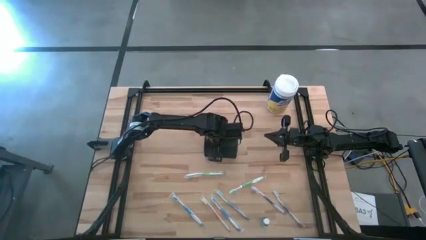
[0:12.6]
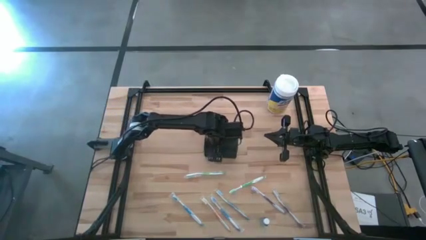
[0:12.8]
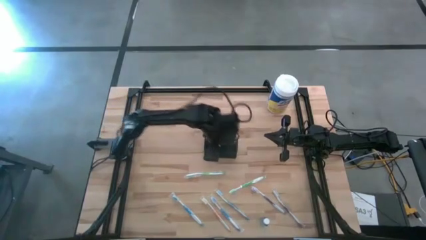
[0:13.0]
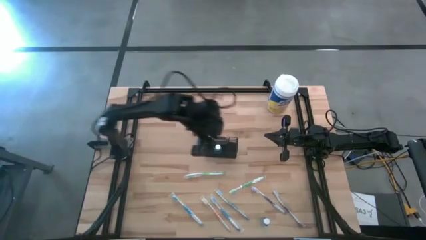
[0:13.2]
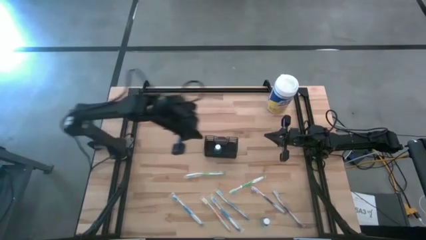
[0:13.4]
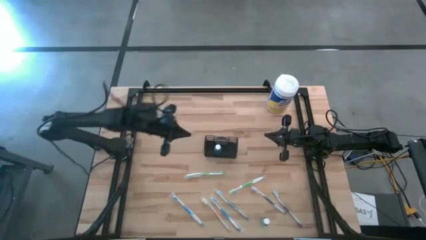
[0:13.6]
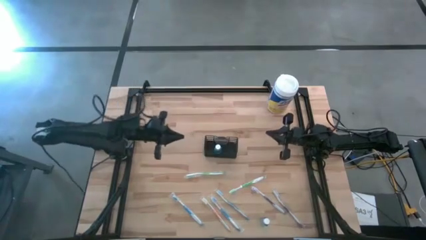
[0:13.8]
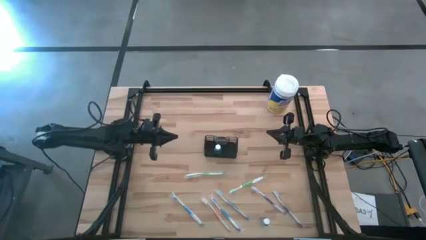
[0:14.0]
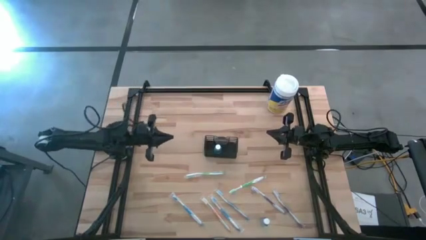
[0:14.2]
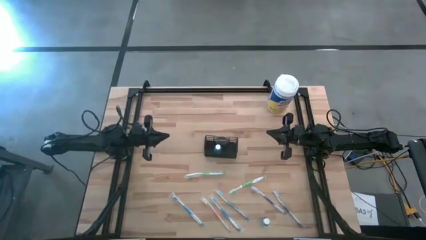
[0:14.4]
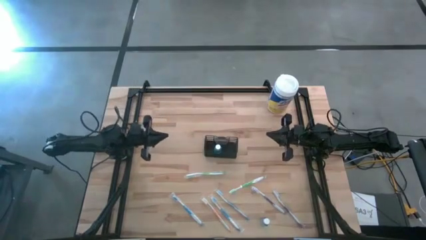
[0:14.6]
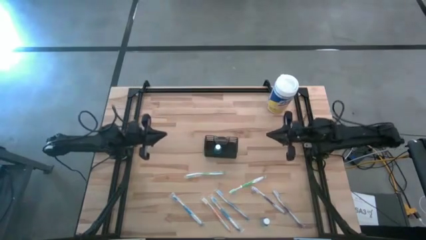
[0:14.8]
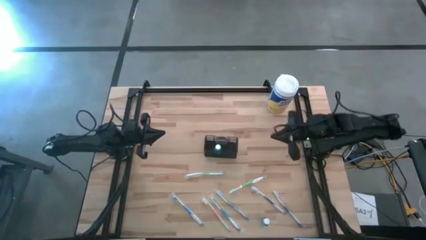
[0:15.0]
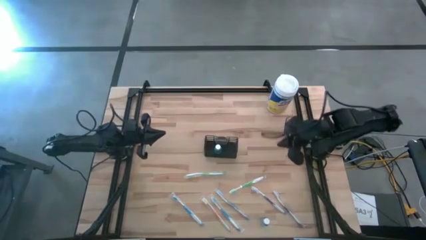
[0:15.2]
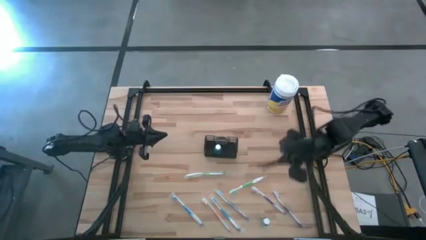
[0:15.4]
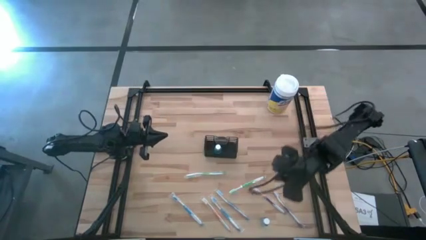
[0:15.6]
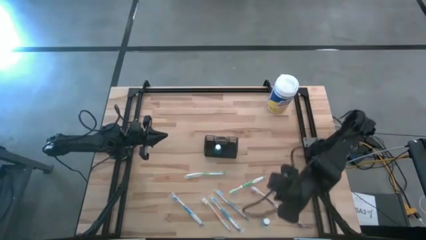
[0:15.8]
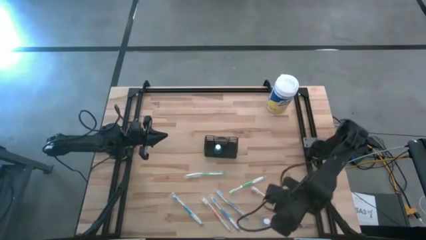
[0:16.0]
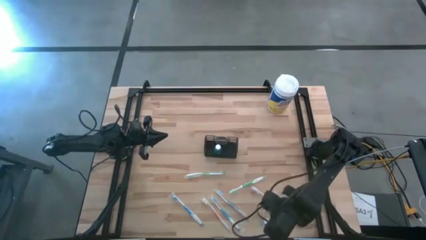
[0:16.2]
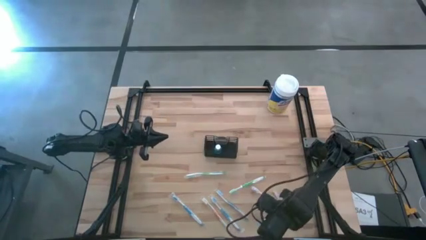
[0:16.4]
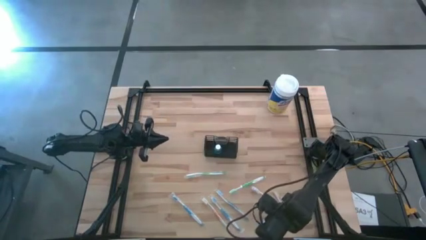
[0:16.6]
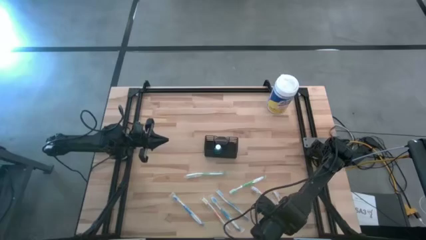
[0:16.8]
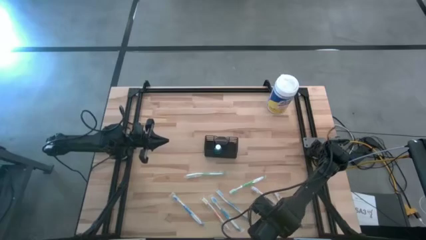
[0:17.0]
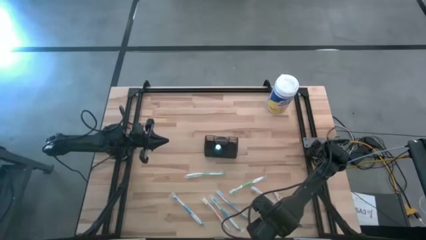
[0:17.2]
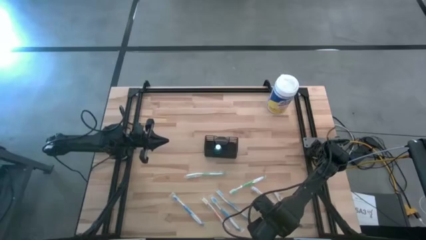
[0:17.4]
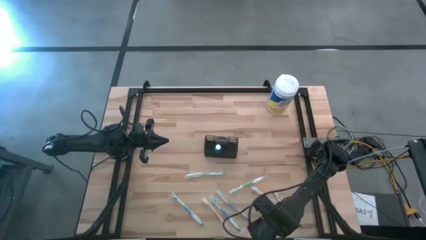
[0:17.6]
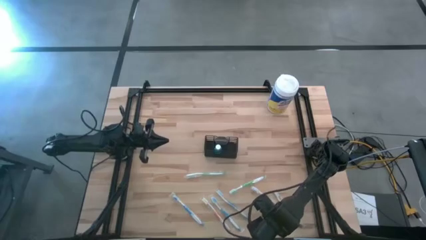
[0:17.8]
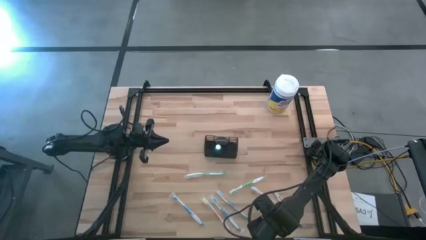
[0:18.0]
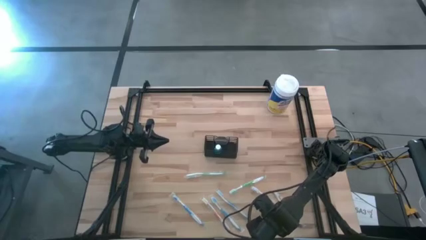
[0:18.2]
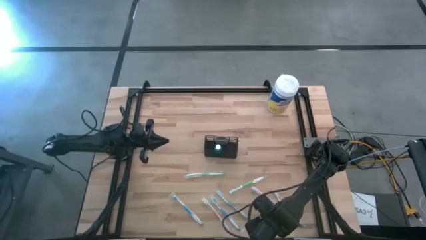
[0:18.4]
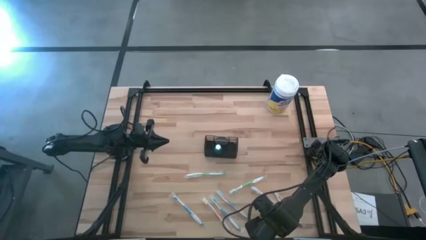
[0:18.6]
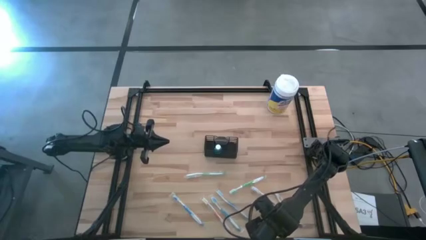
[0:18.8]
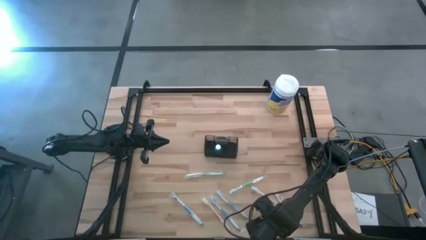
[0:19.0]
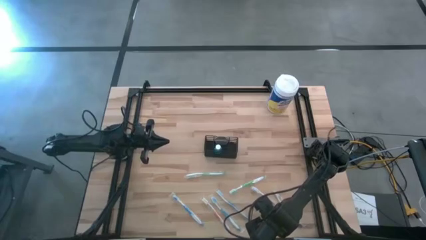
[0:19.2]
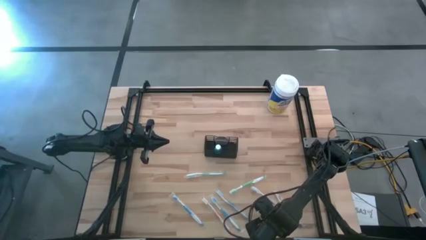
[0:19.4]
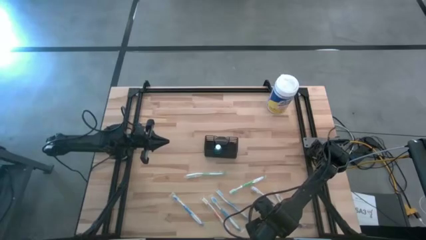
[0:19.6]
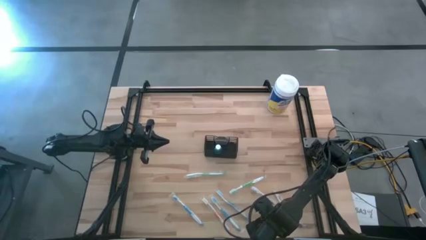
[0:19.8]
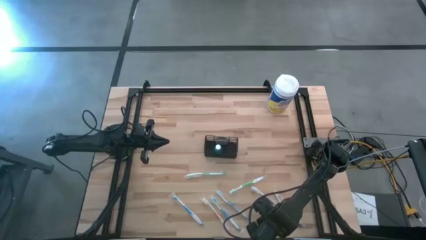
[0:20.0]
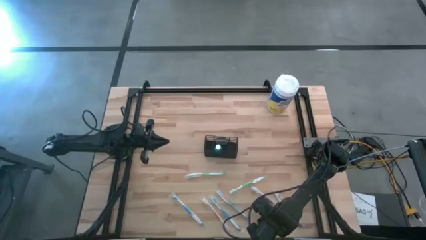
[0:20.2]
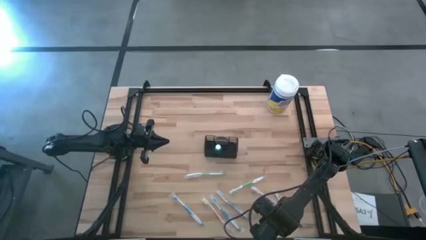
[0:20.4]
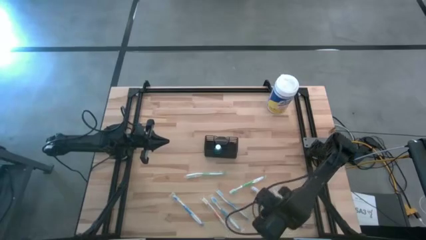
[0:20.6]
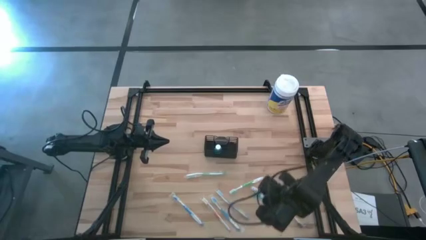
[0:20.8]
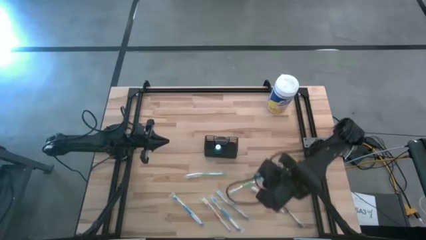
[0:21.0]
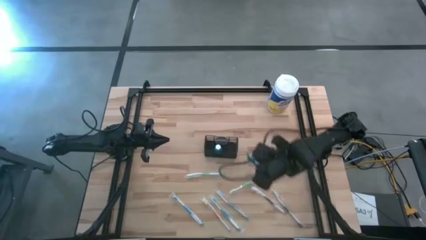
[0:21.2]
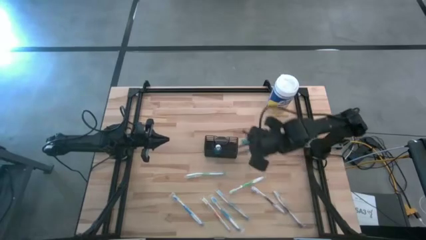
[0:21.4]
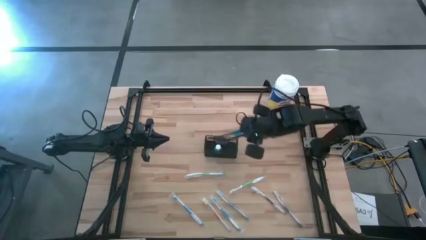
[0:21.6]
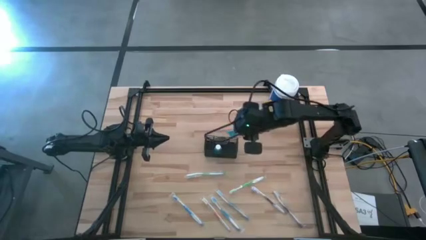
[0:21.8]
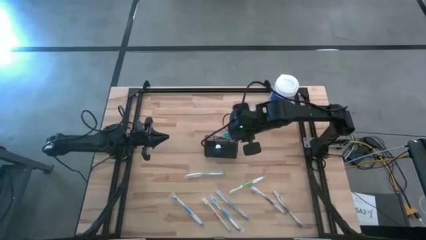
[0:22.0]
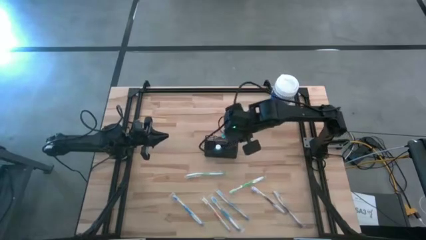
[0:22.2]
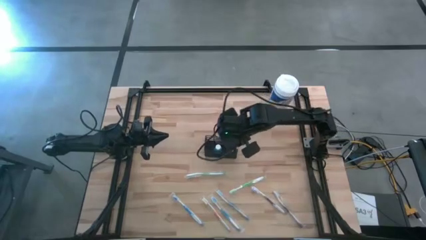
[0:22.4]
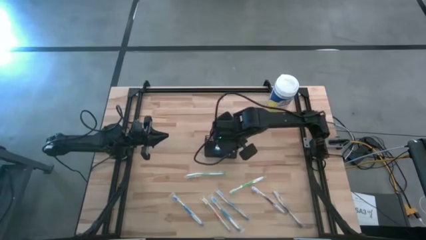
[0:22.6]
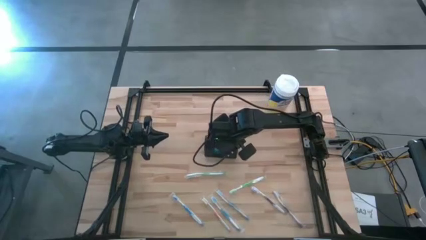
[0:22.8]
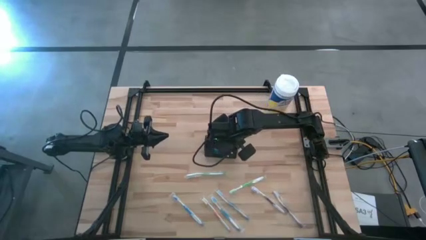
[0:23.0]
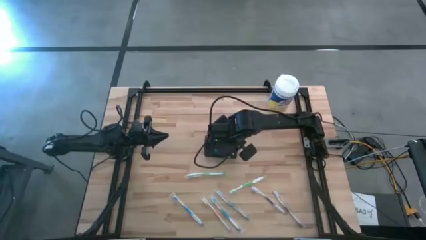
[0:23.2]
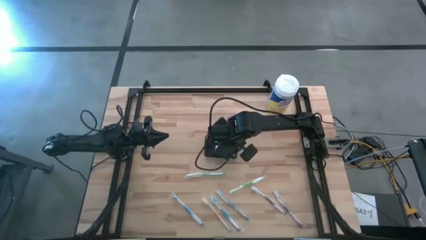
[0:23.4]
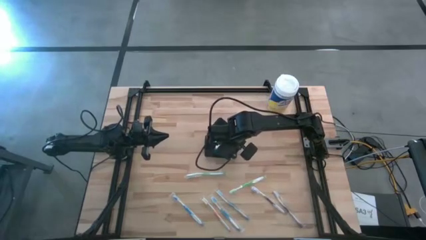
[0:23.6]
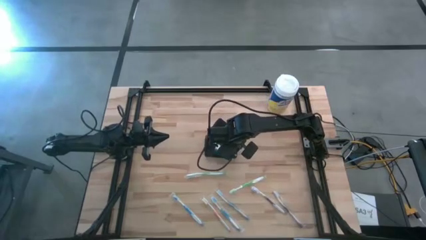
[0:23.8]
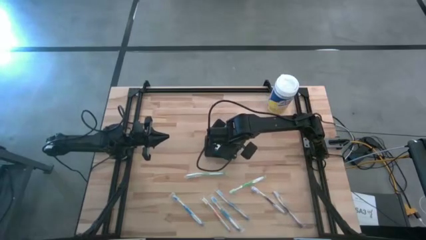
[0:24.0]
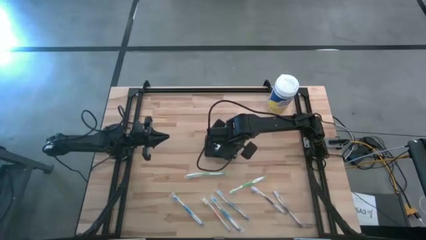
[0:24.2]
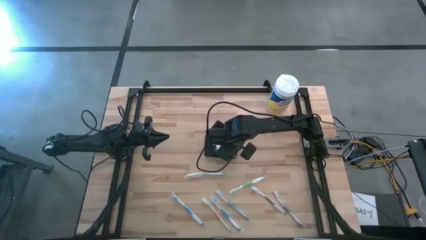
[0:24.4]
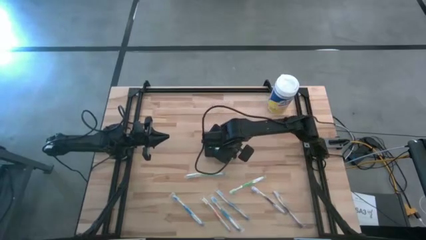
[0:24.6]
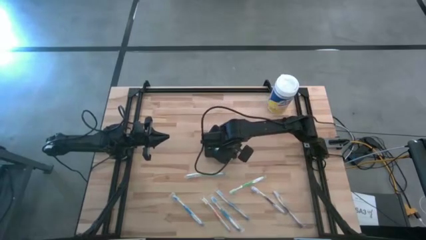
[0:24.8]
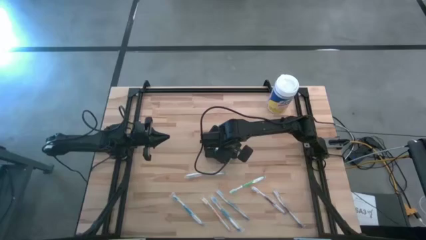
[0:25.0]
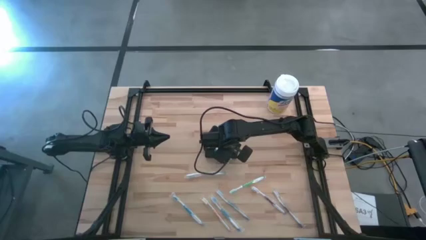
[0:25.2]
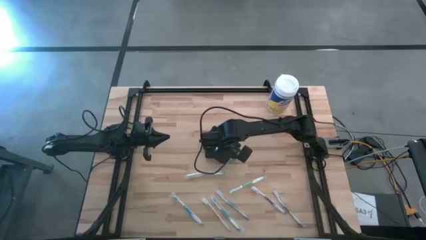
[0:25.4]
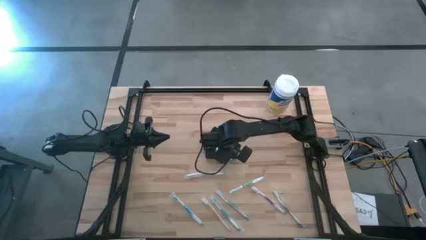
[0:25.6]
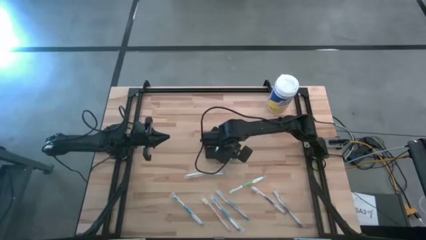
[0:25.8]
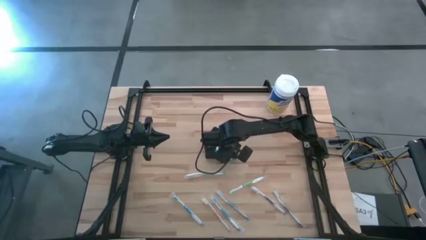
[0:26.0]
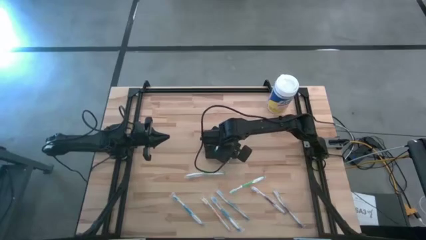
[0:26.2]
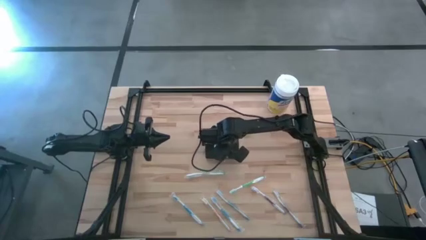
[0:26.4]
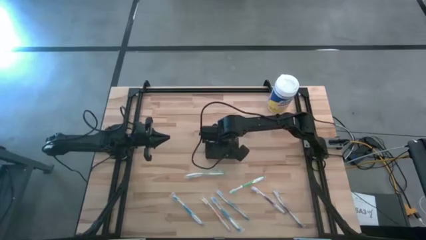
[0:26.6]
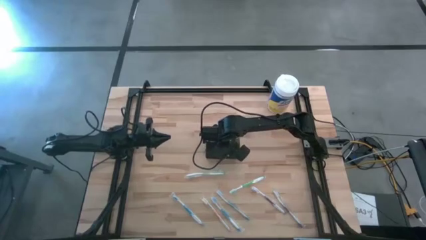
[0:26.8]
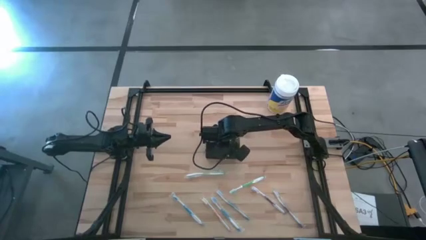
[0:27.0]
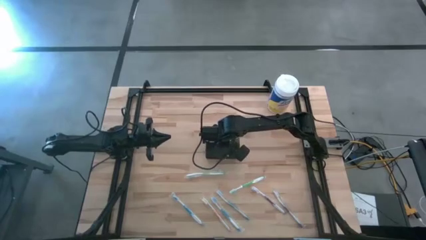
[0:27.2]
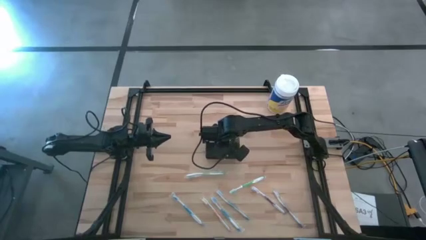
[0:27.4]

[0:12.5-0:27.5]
Task: Pick & Place toothbrushing station
Put the blue mouthwash bottle into the black organizer

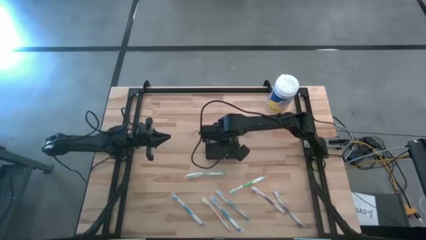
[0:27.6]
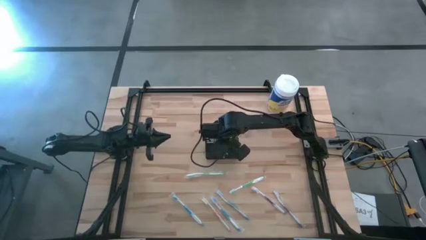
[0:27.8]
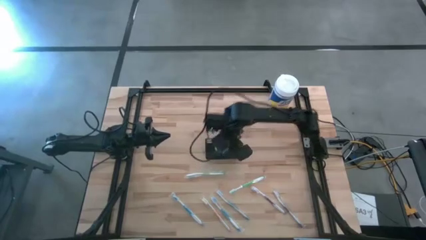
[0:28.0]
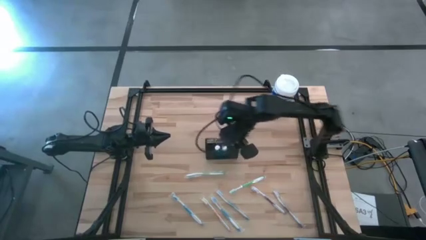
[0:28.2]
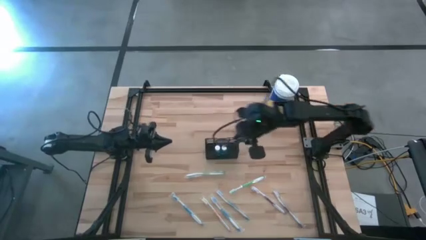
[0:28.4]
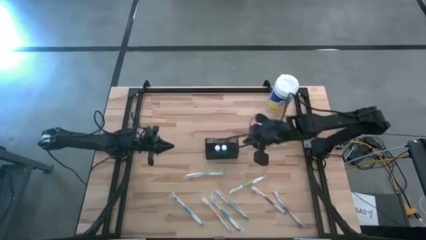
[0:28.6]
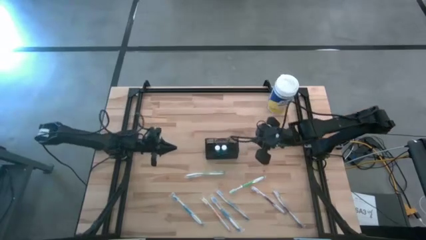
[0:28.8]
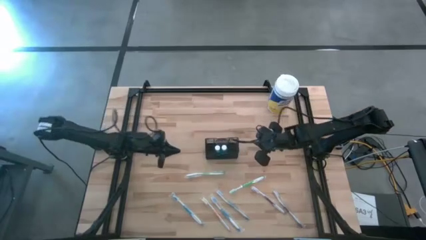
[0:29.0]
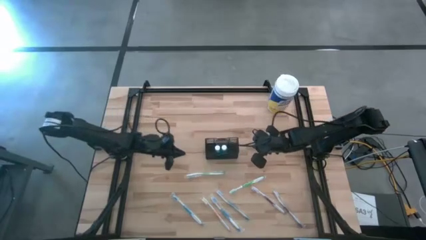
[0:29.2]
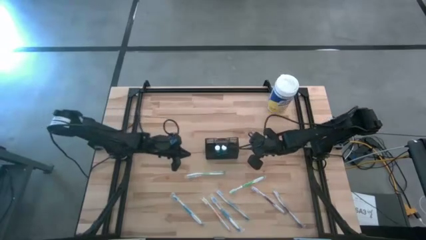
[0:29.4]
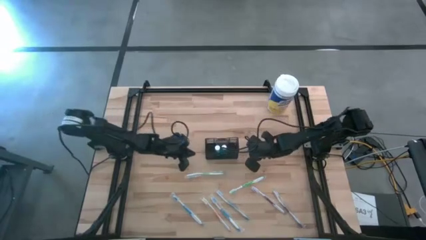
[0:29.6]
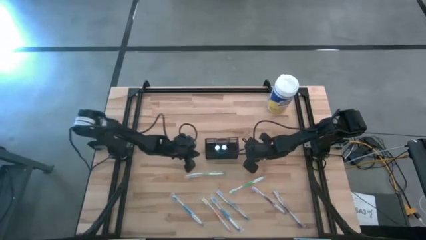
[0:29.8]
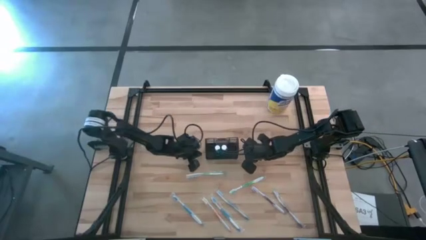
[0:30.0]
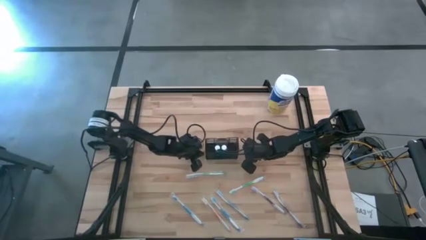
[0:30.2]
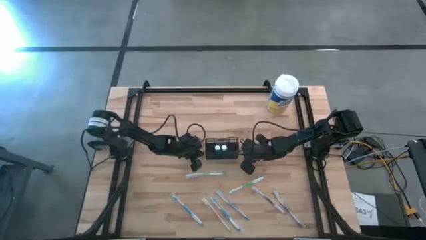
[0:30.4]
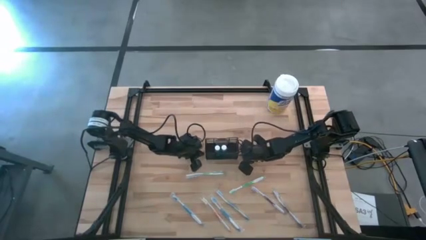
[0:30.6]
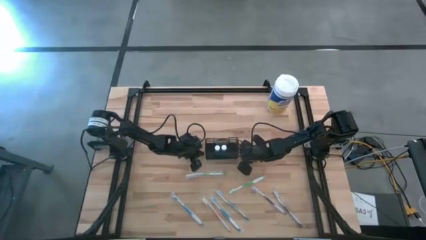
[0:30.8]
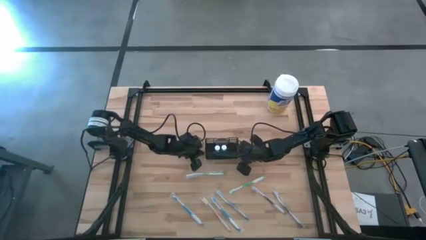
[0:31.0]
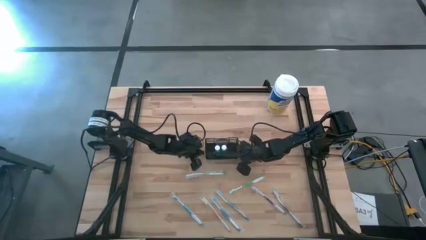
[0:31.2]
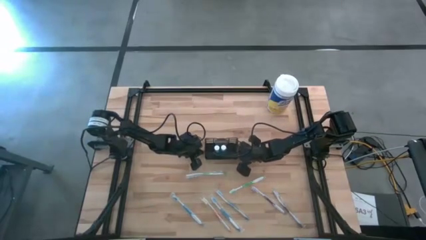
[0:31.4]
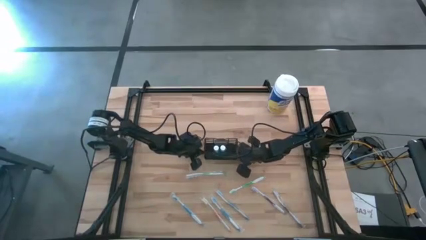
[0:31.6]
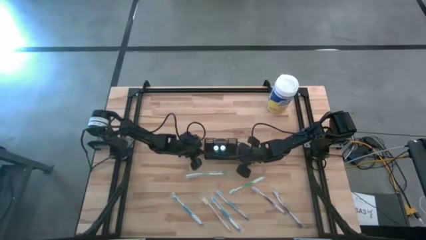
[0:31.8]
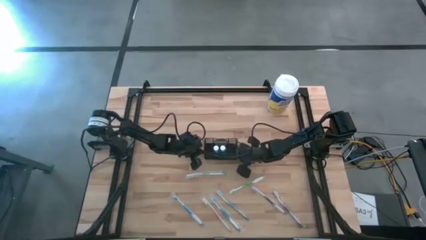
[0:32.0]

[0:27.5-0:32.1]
Adjust the black organizer on the table
